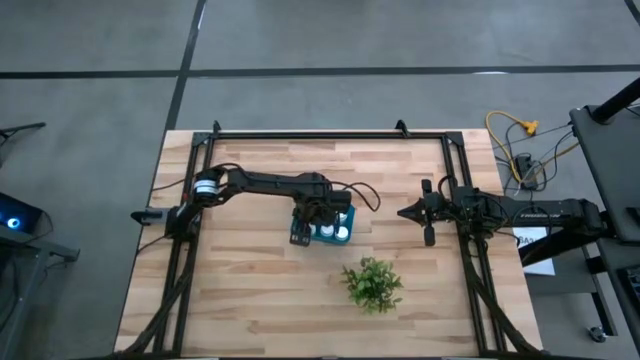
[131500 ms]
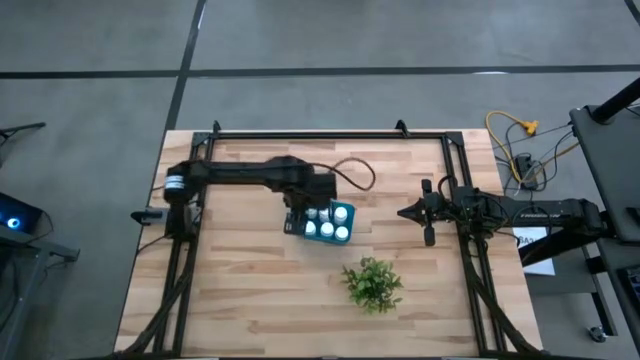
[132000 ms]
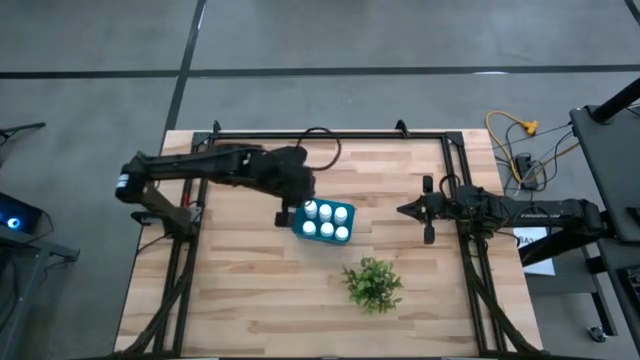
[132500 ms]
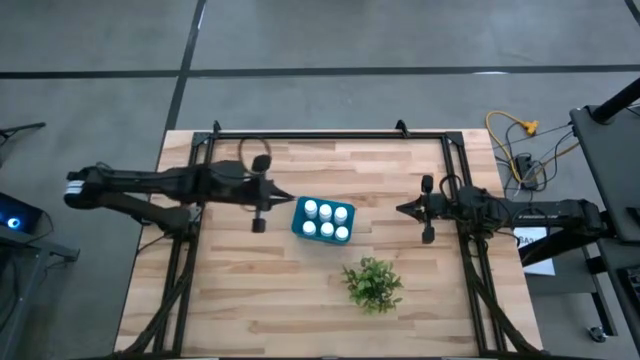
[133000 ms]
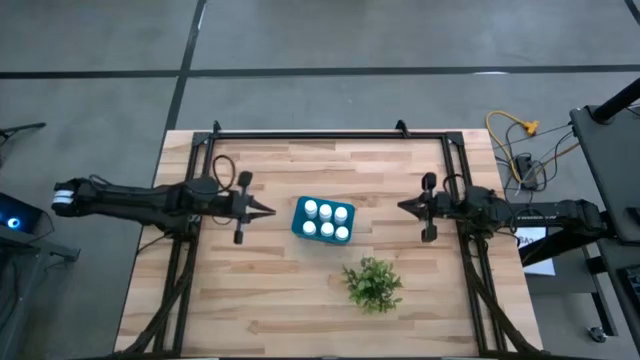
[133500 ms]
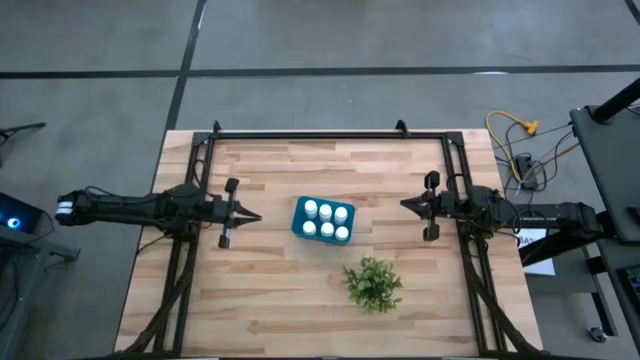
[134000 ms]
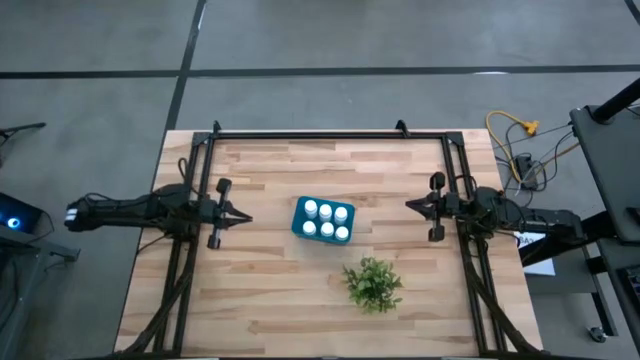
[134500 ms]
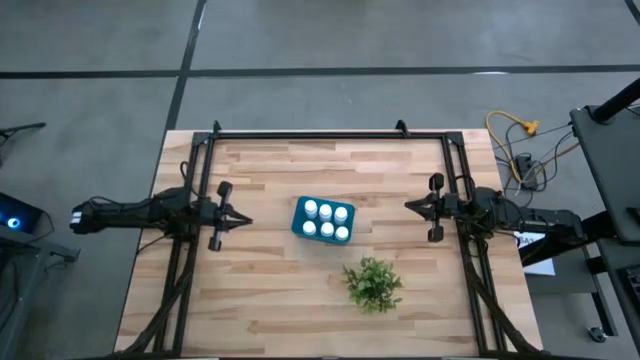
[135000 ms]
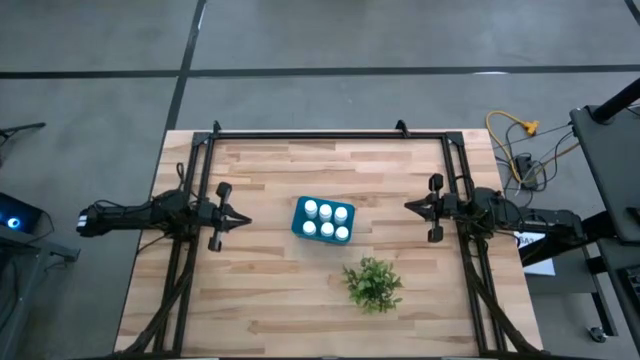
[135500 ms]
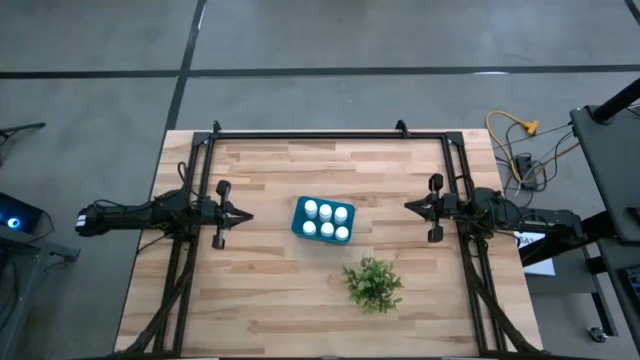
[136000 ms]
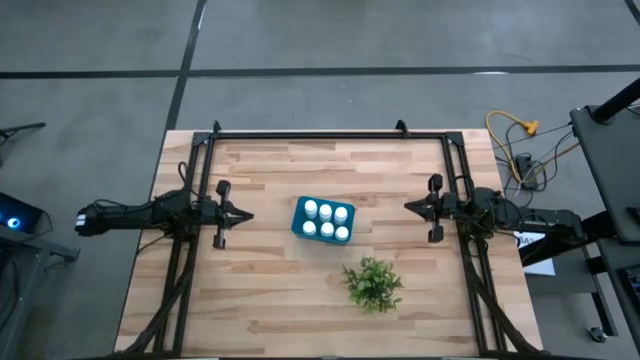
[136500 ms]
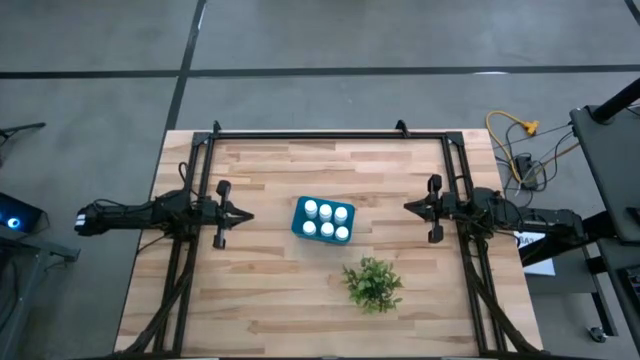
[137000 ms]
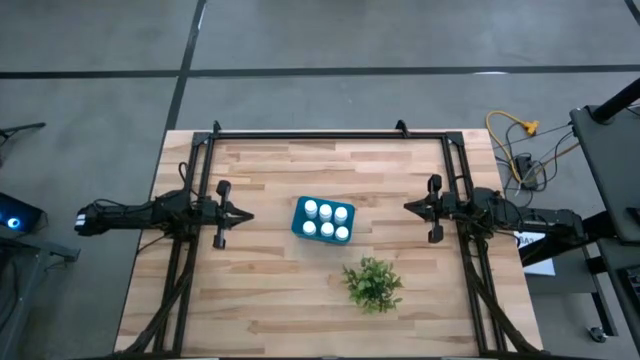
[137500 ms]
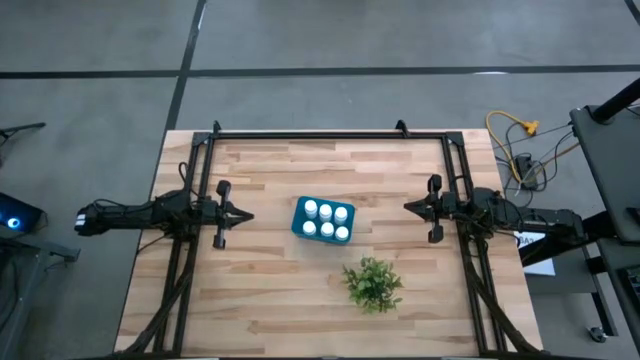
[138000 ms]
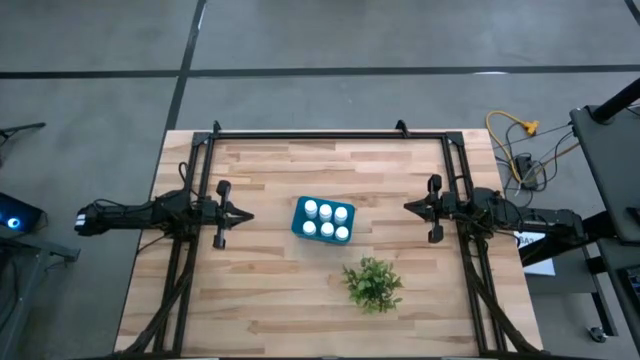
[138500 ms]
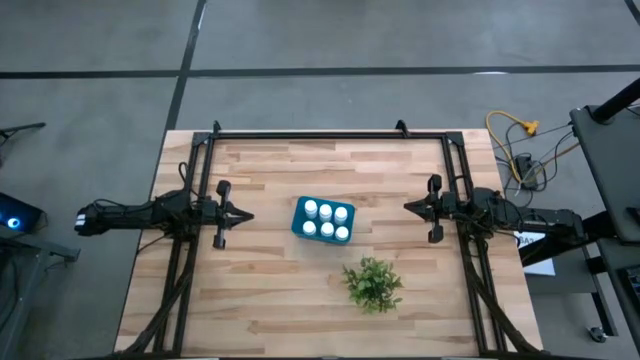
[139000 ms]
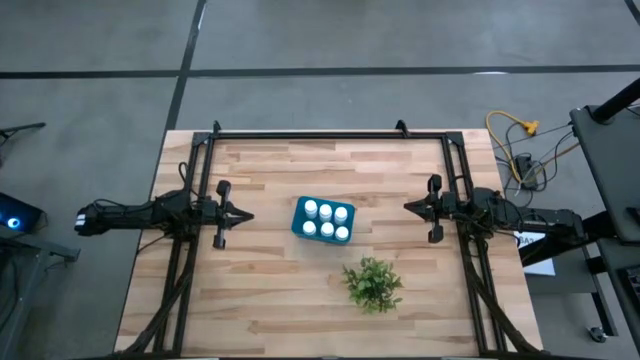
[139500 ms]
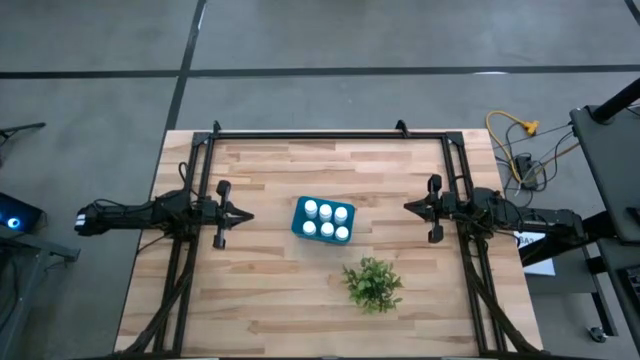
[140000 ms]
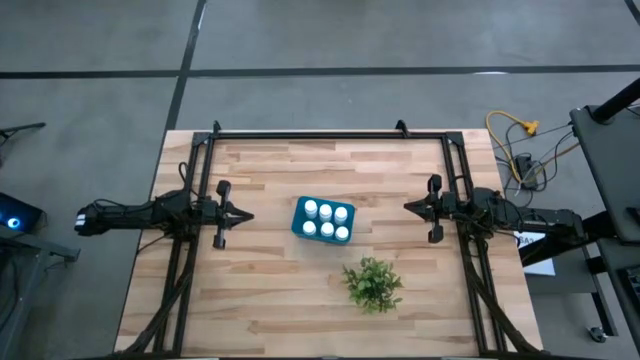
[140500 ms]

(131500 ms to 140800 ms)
Task: Pick and place pill bottles into a basket
Return to Home Position

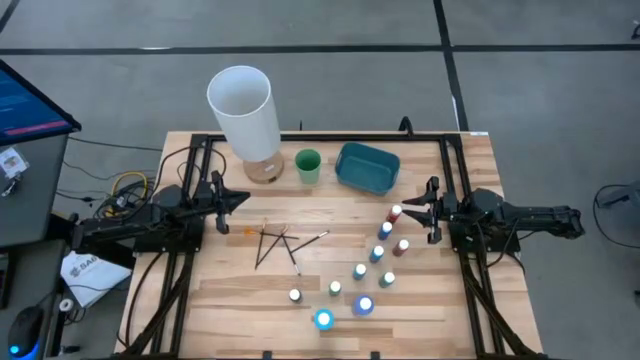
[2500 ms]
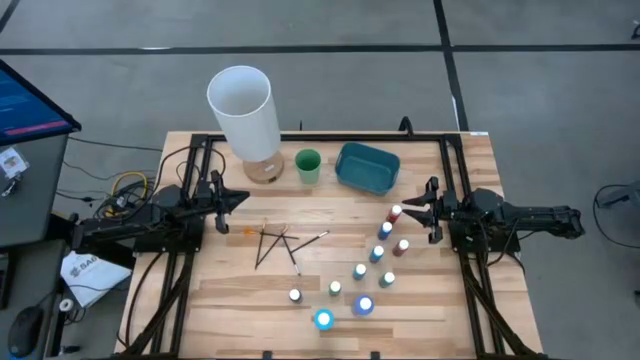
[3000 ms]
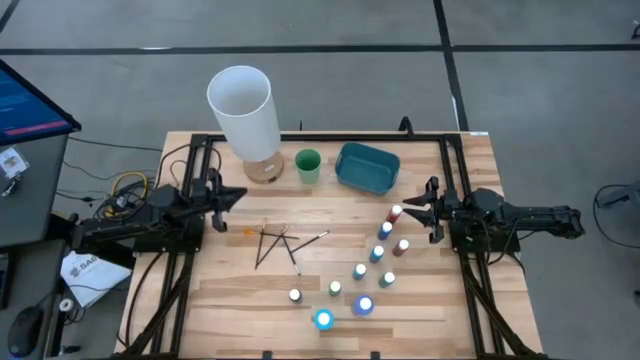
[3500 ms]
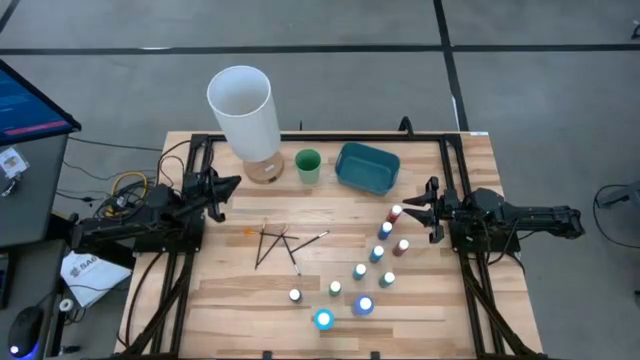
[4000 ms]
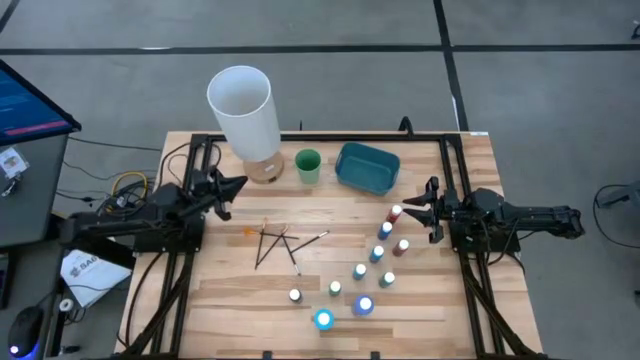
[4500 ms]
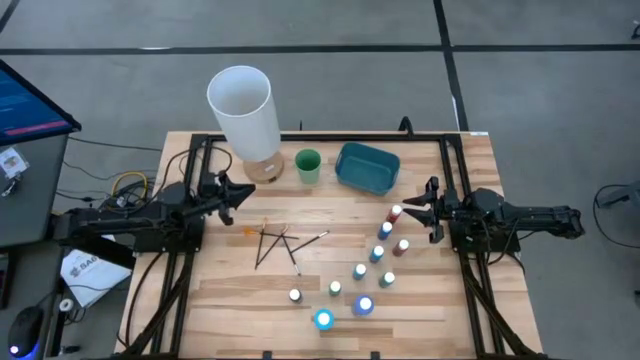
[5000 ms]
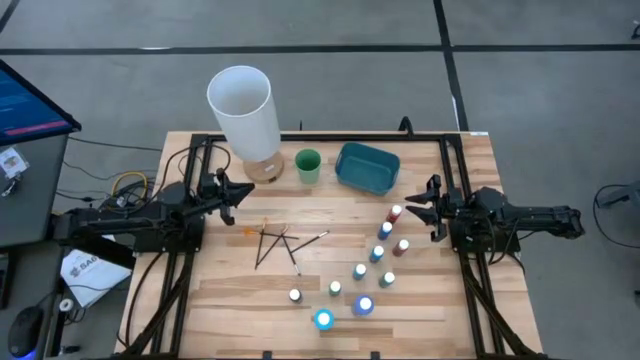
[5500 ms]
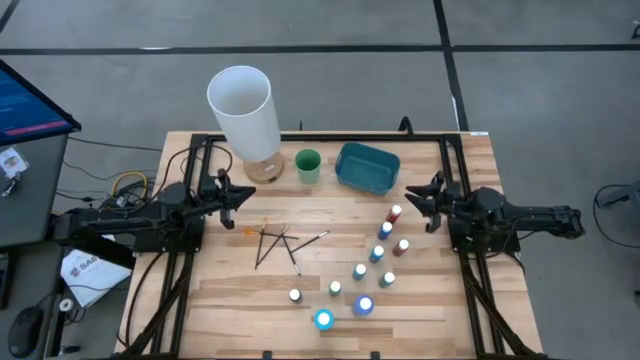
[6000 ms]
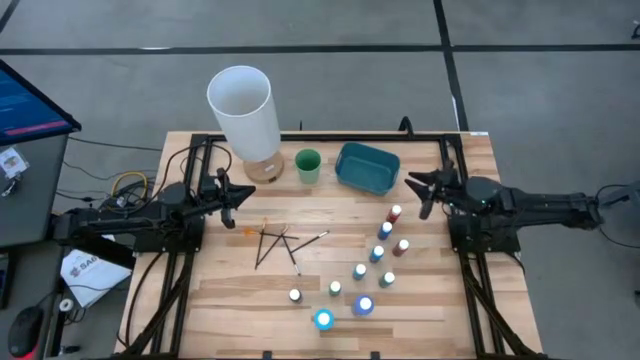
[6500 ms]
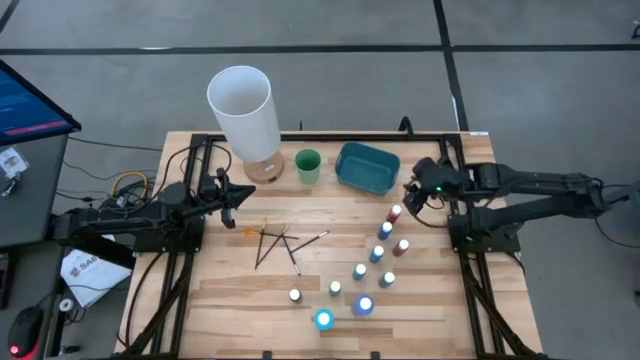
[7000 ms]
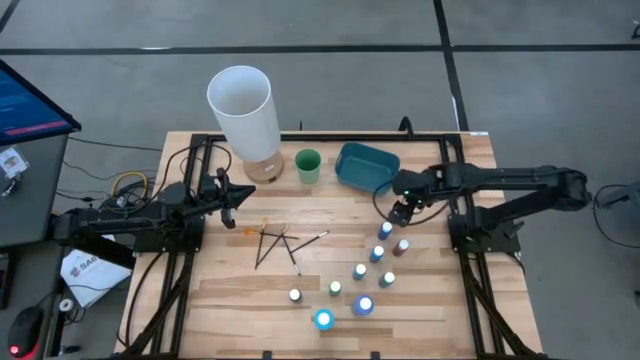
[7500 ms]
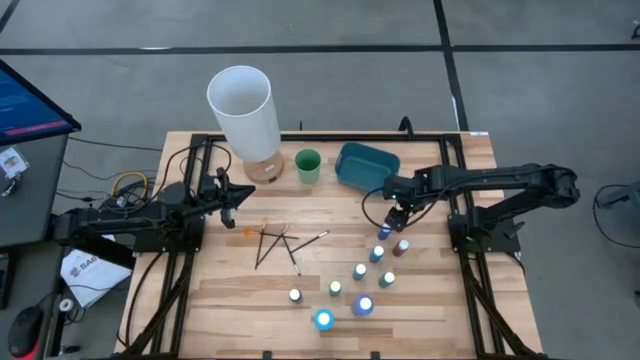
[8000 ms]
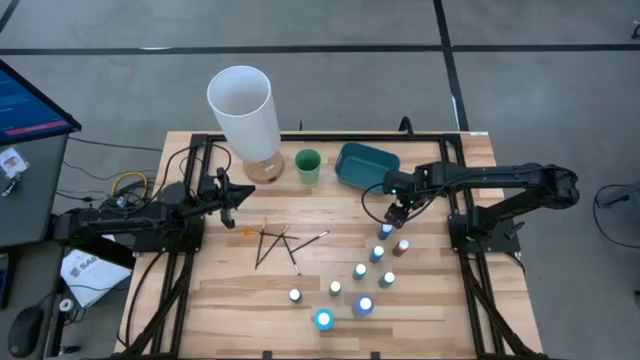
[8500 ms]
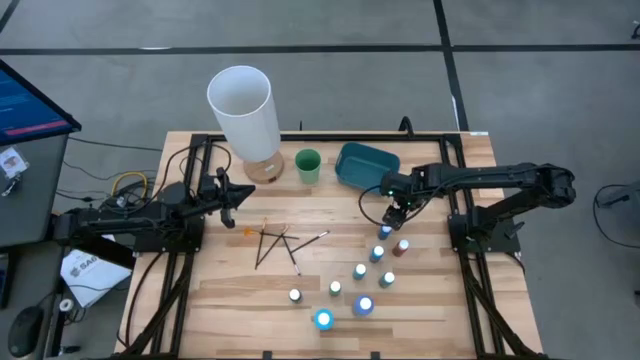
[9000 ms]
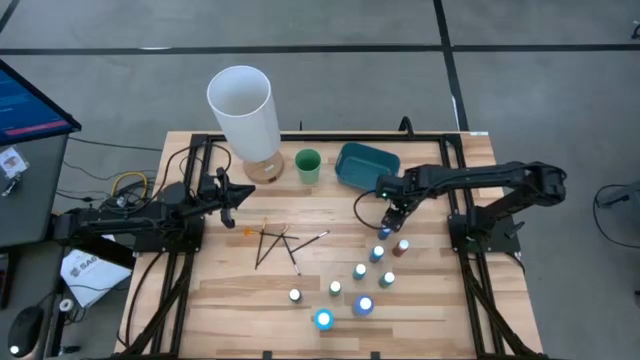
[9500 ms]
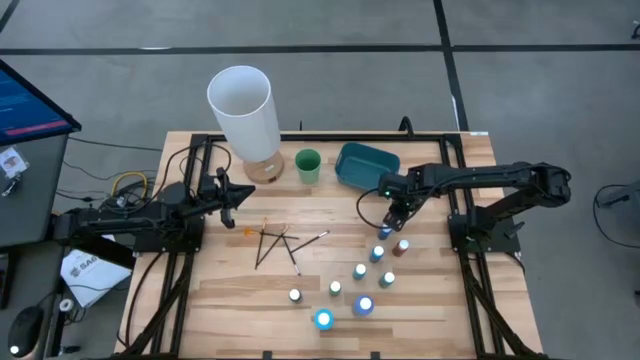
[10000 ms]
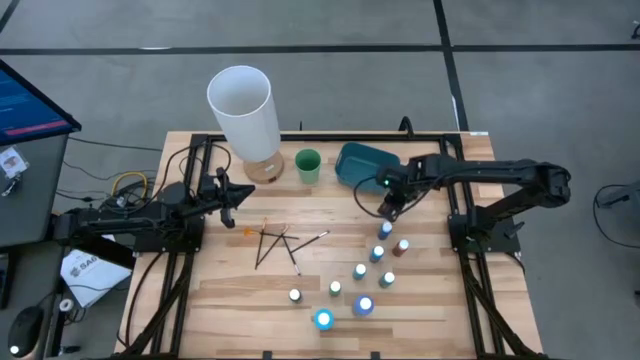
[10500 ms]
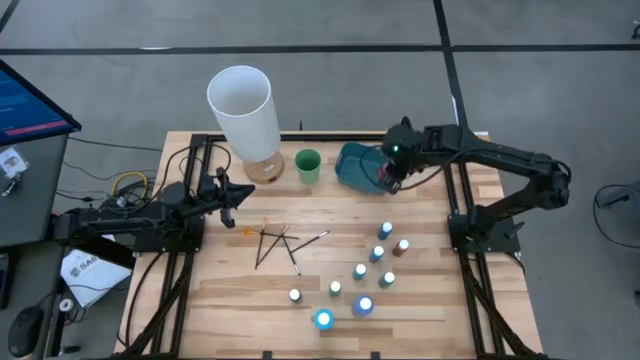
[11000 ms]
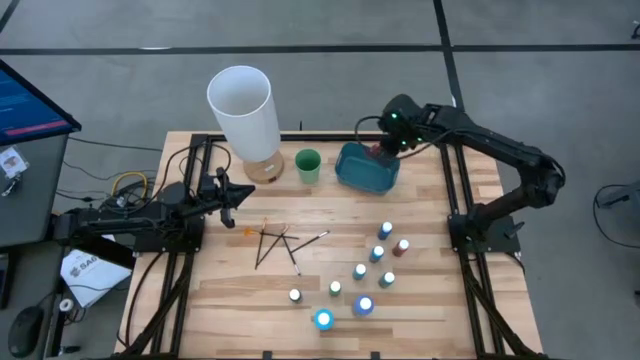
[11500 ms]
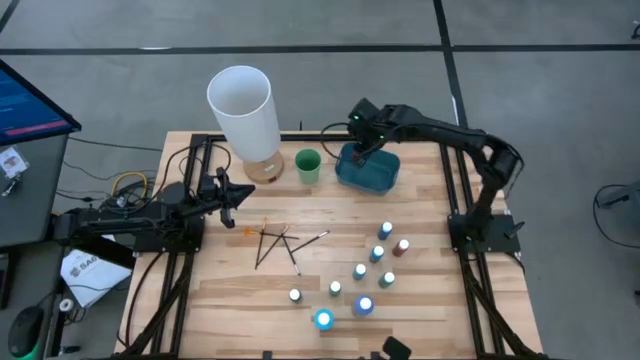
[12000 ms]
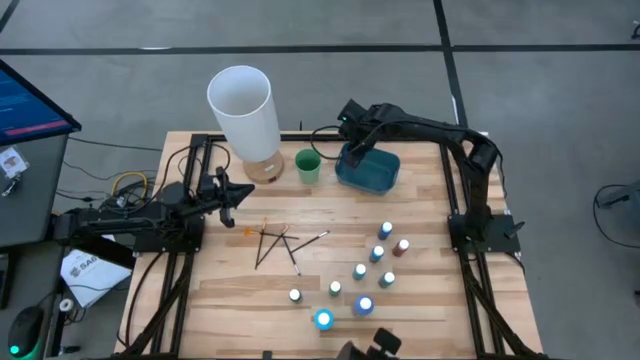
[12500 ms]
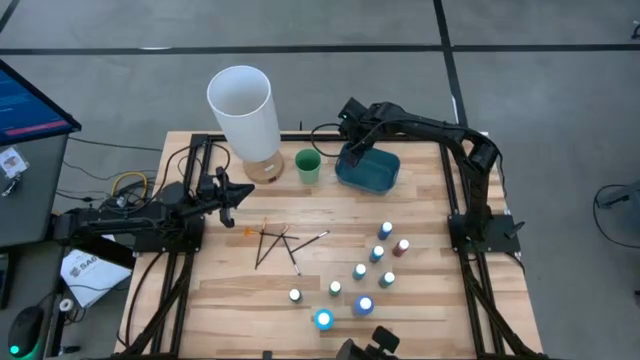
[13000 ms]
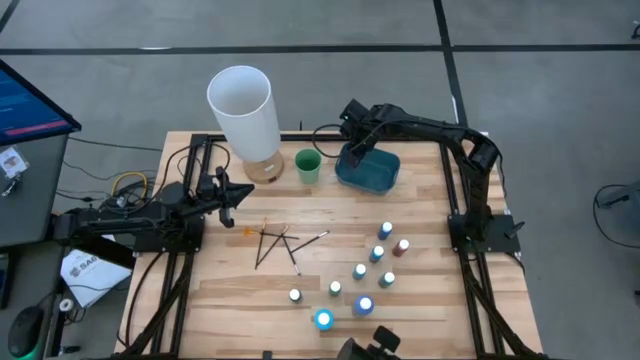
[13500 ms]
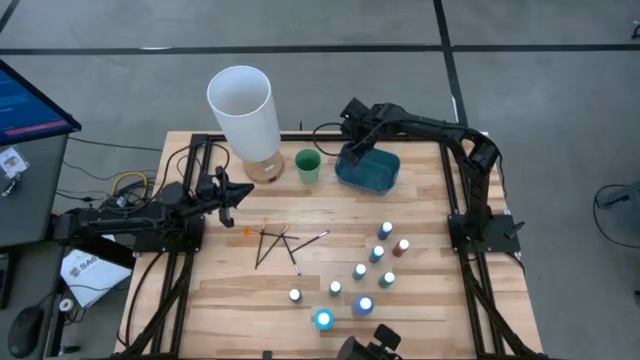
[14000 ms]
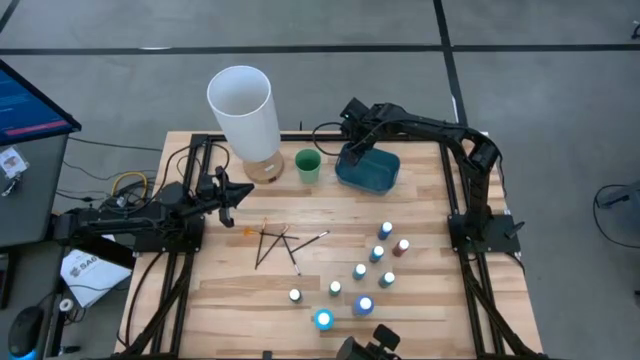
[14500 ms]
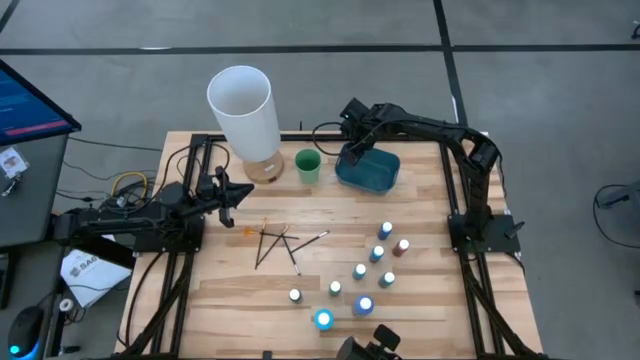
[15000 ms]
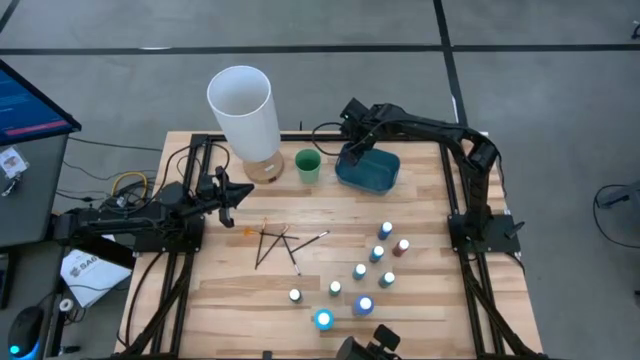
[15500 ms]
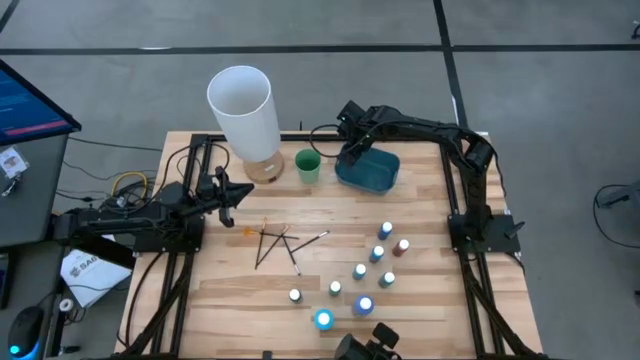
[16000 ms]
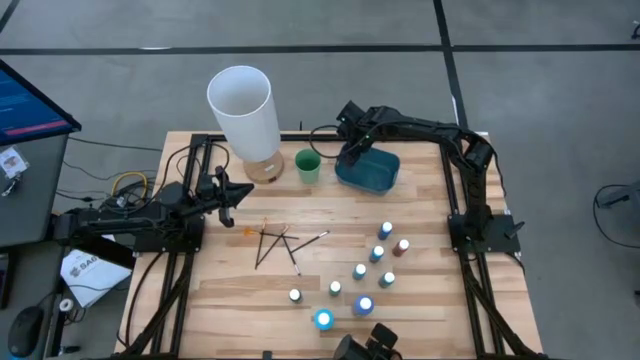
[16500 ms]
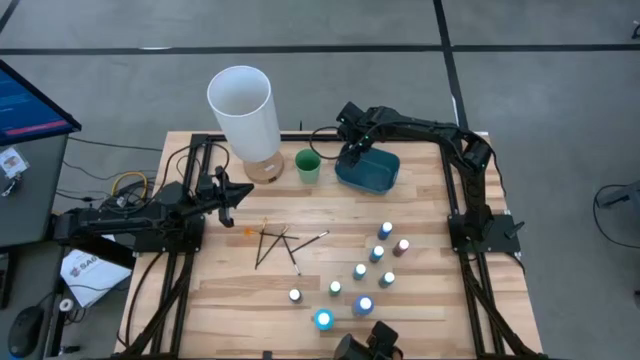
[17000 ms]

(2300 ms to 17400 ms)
Task: Pick & Place Paint Supplies
Put the top red paint bottle into the blue bin
